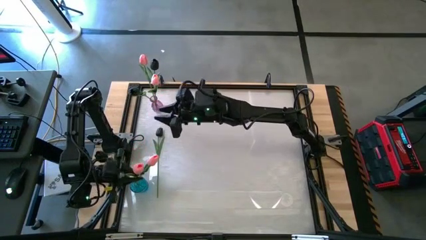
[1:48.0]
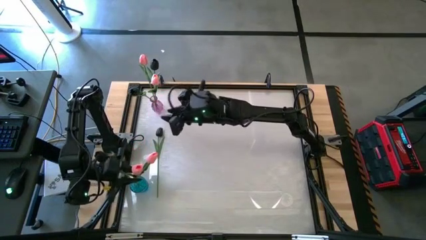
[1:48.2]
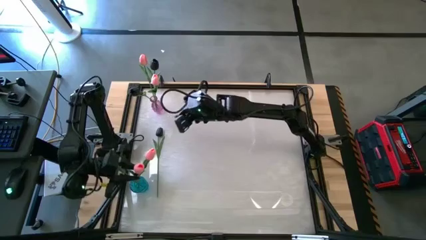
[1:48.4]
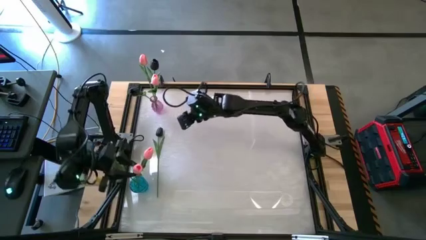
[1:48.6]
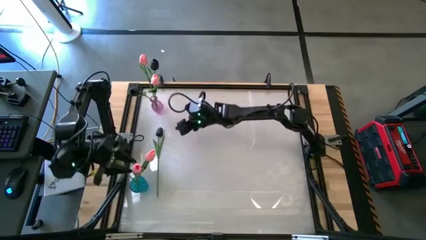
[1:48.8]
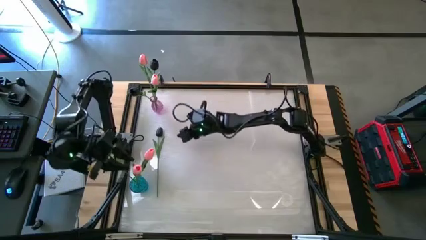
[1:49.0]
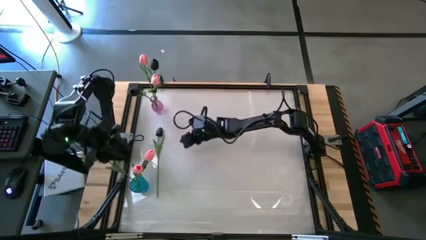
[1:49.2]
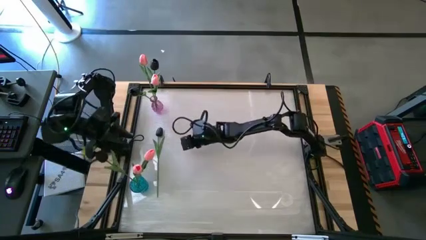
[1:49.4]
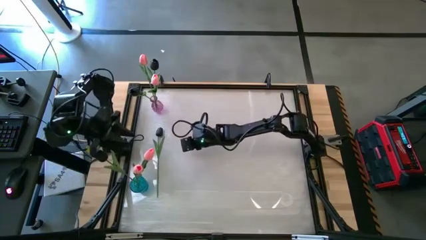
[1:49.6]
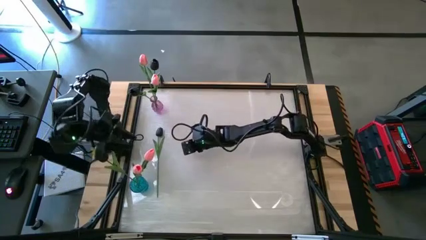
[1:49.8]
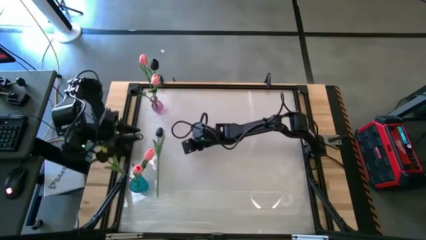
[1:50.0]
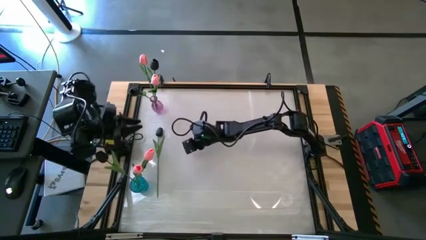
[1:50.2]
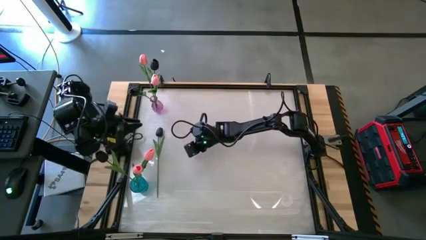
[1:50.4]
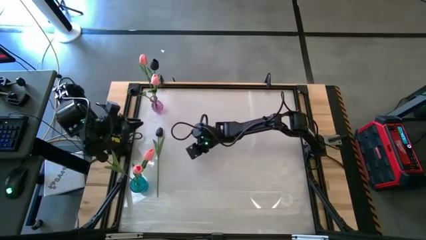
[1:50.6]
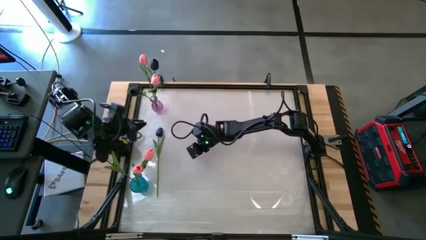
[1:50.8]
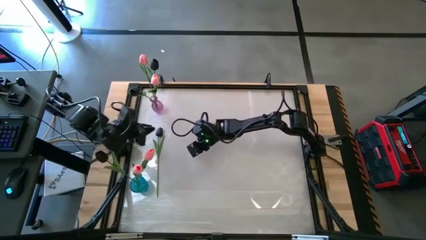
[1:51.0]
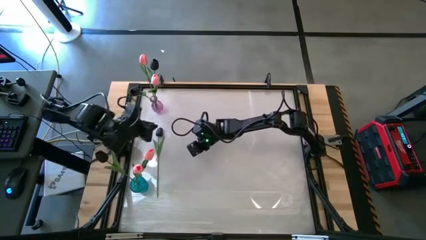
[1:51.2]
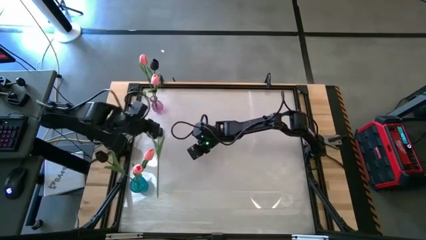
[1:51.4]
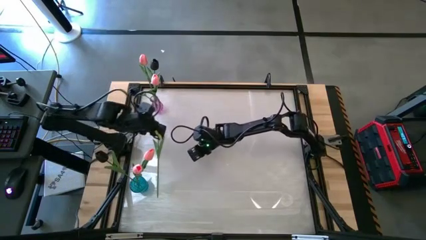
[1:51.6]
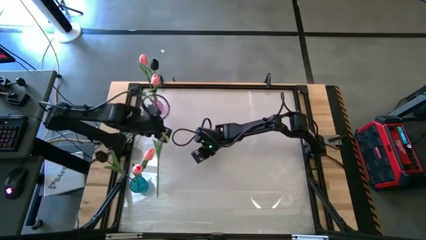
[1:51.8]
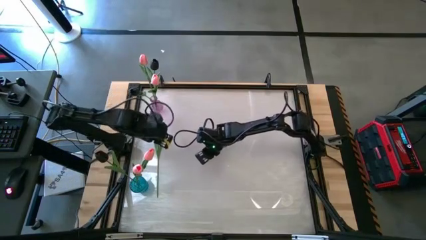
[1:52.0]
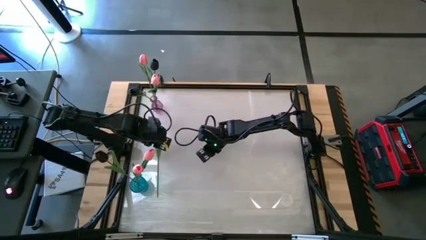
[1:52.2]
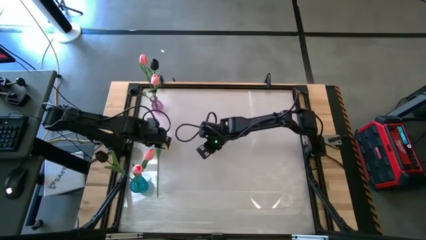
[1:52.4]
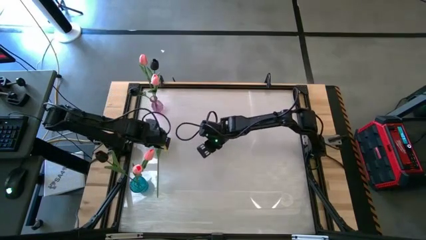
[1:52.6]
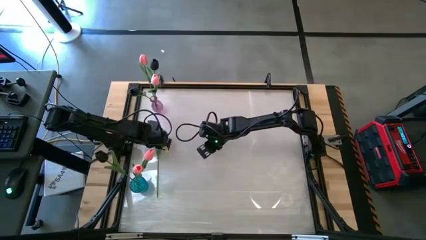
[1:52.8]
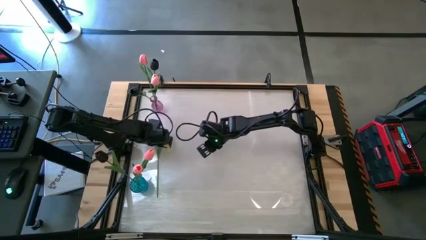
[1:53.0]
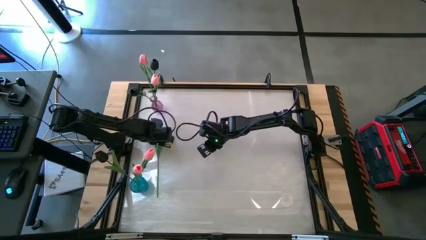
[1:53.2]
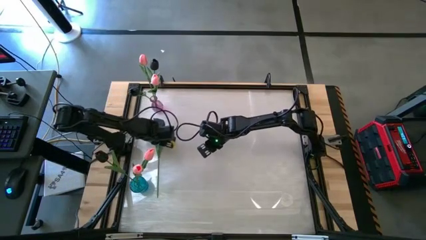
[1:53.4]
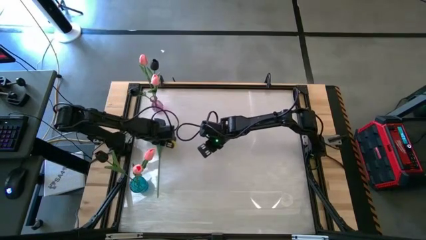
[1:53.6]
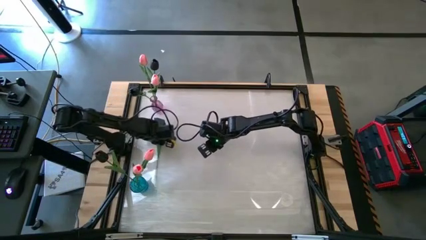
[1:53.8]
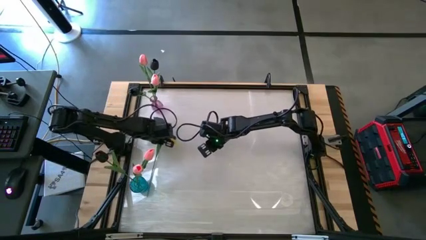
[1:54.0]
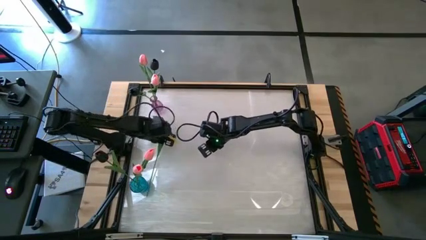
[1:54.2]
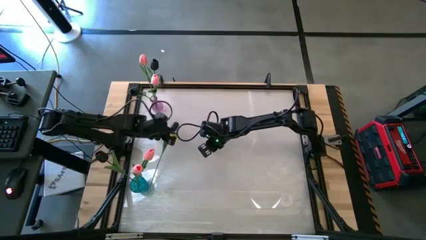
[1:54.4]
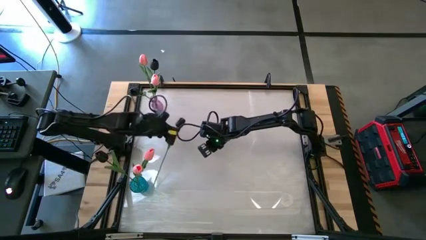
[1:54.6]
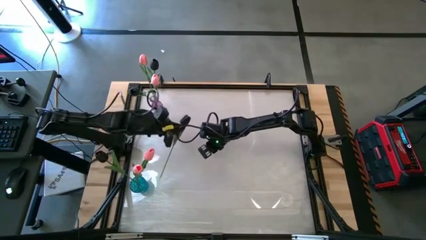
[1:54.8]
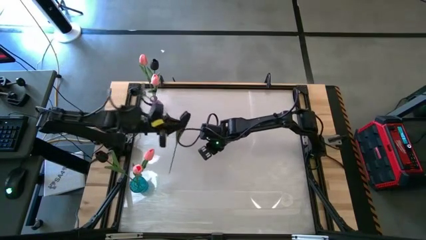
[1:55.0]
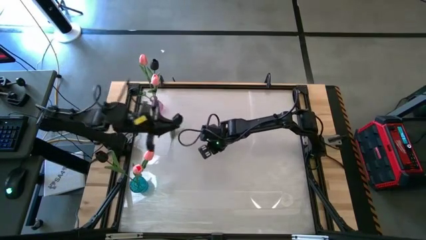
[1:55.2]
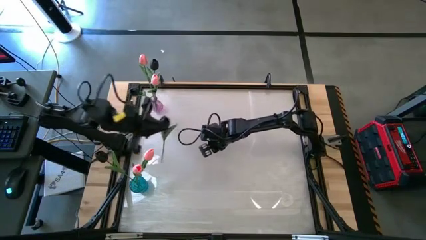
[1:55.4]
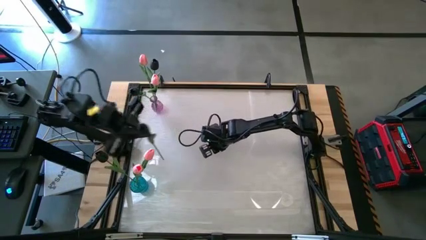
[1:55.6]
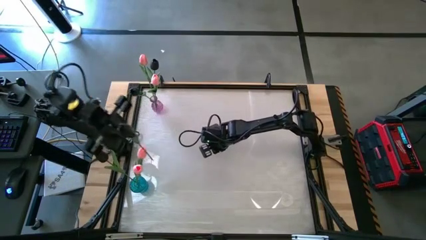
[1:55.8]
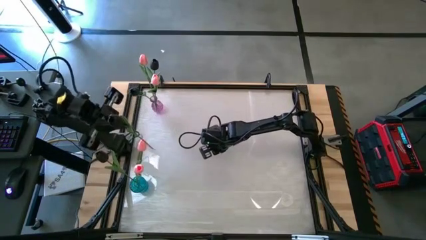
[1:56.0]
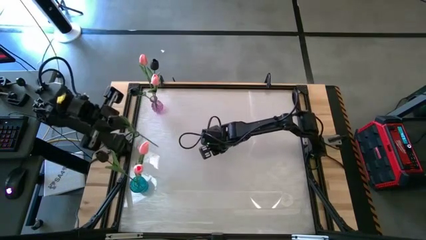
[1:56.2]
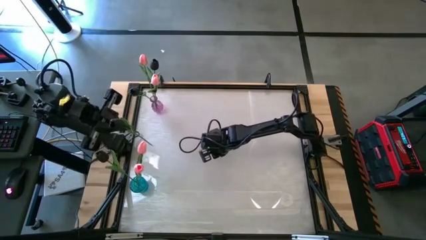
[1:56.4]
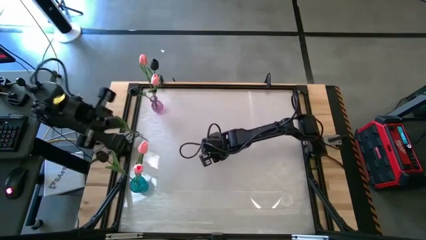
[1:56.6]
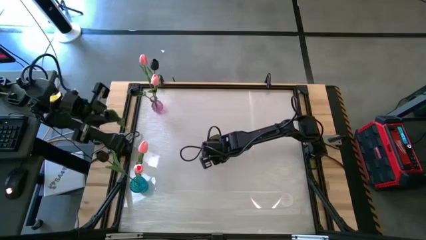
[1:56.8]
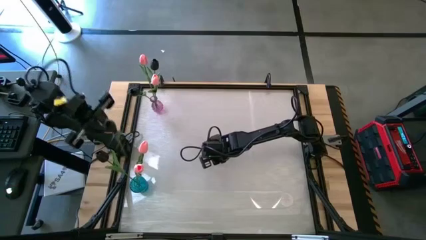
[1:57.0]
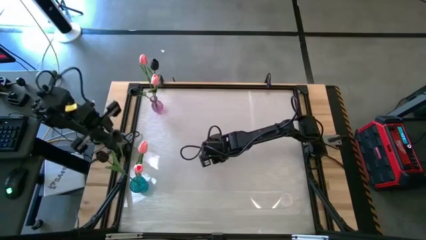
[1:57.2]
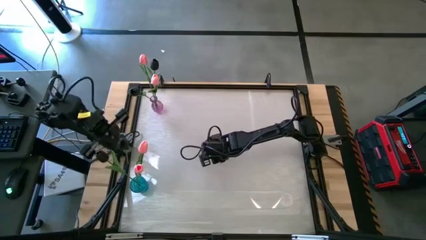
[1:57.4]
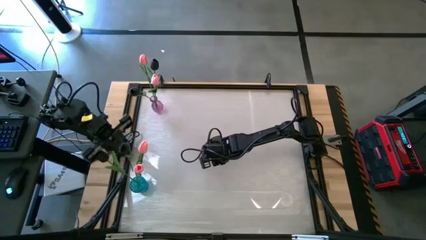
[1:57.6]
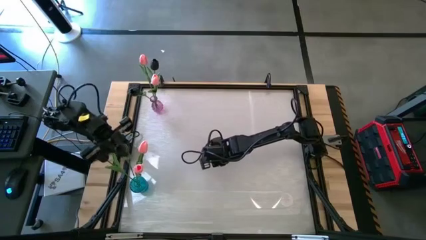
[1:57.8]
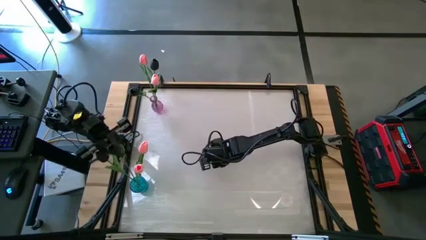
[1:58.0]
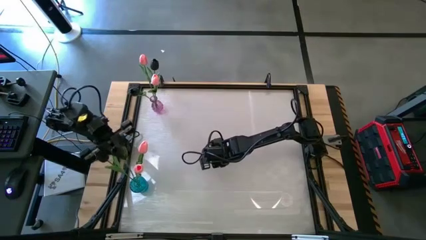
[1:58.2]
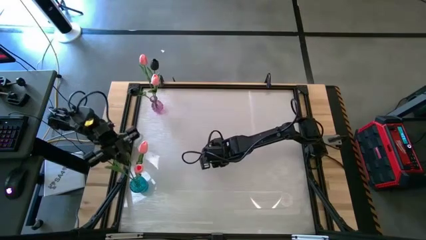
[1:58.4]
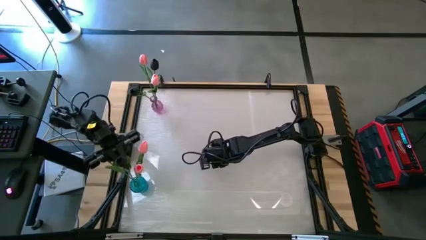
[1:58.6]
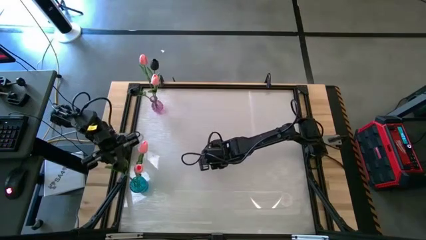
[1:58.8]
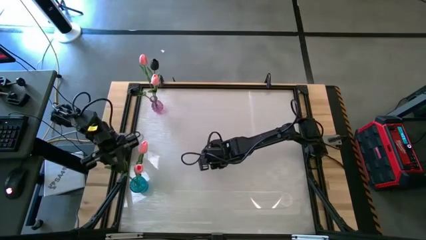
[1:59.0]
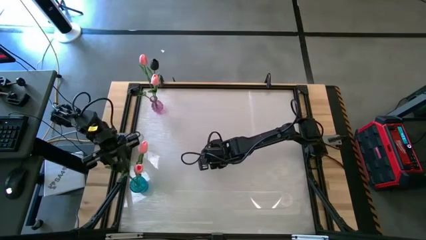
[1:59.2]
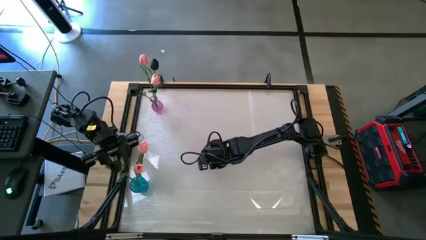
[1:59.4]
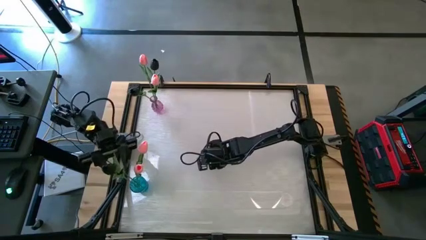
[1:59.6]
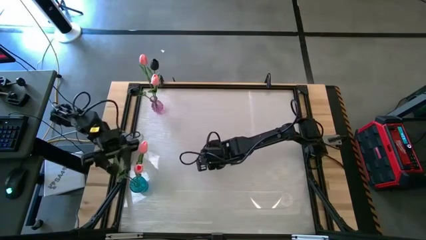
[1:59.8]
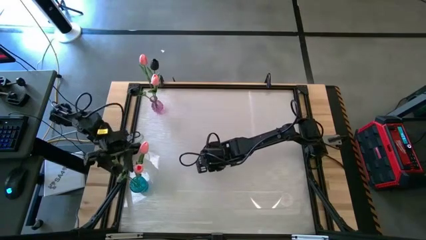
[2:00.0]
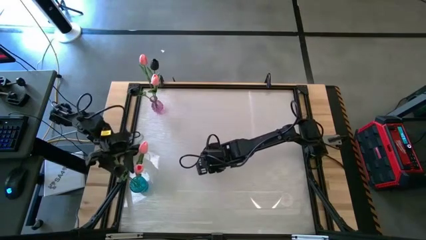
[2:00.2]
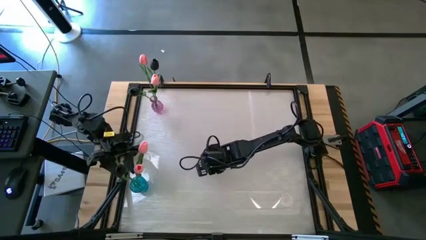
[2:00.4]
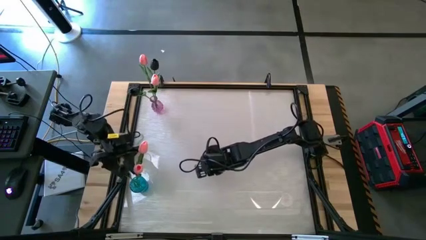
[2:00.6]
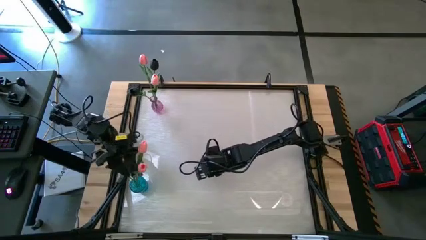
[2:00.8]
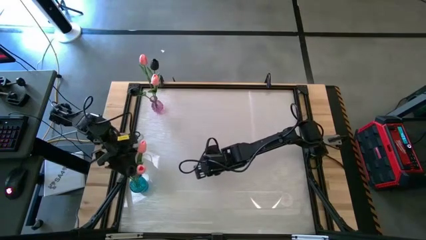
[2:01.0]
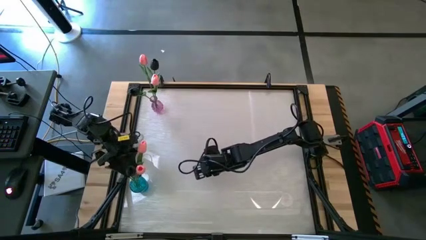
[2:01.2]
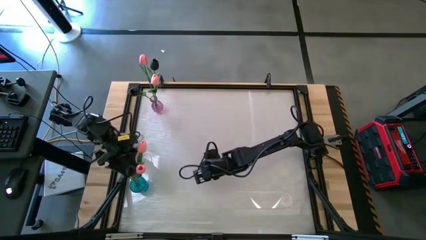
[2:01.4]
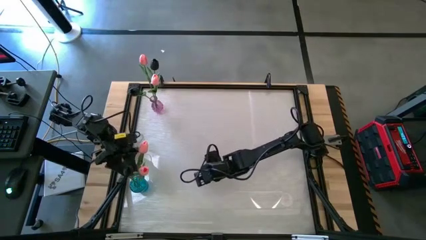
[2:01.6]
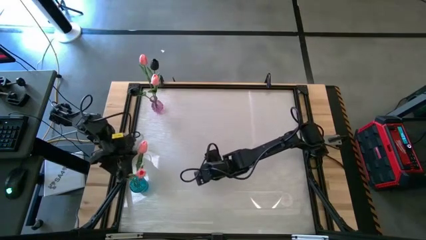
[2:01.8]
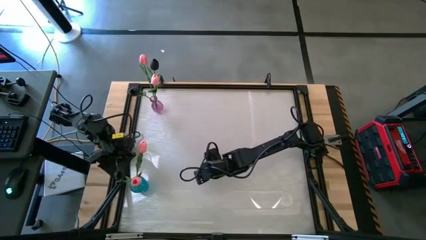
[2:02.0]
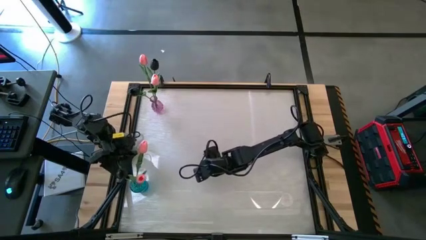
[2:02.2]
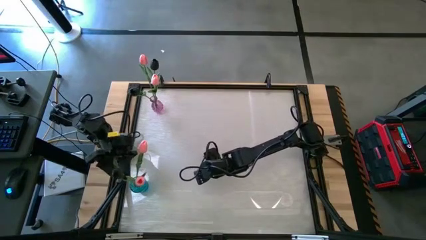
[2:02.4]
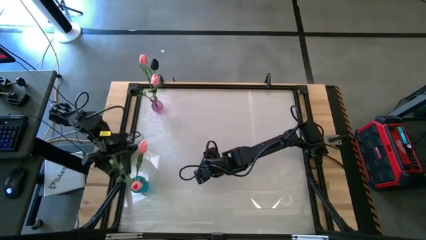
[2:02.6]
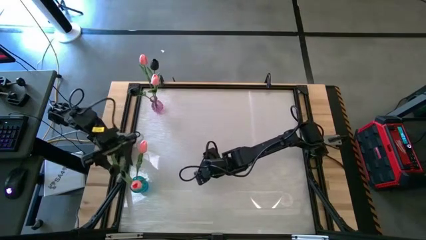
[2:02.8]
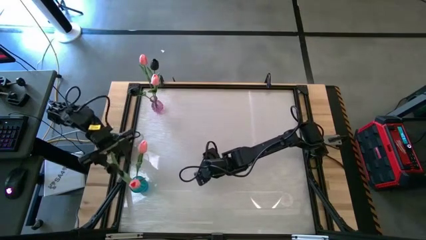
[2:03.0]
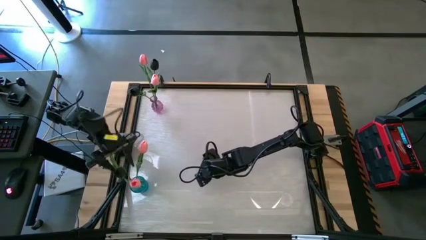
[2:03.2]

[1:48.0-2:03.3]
Task: Sort flowers into vase by color
Put the middle left black flower into the blue glass vase
